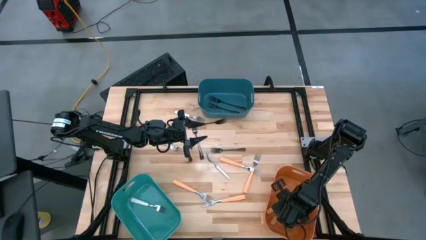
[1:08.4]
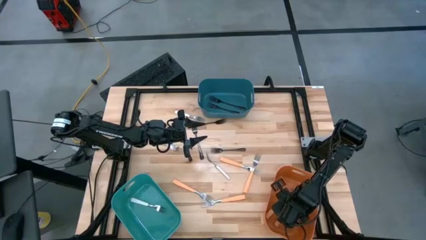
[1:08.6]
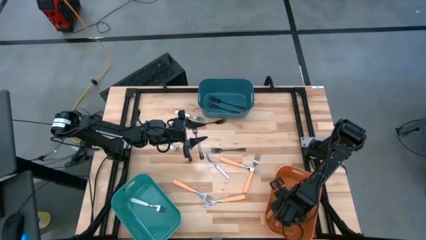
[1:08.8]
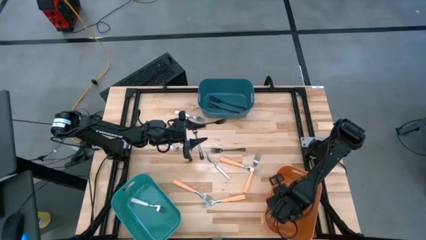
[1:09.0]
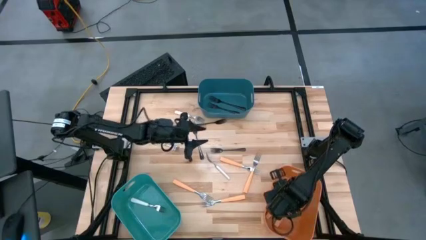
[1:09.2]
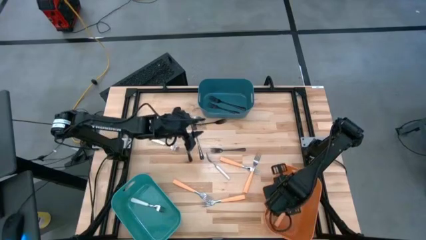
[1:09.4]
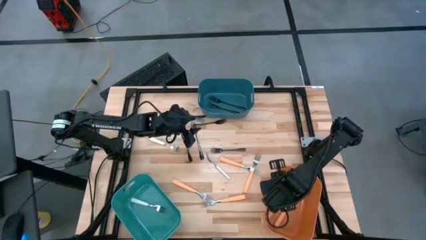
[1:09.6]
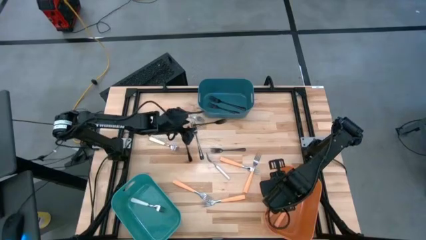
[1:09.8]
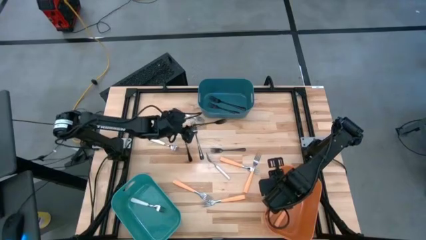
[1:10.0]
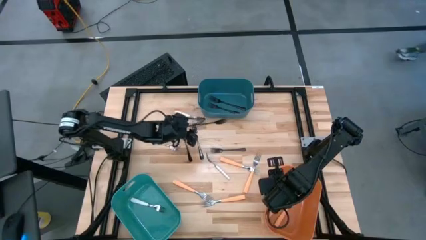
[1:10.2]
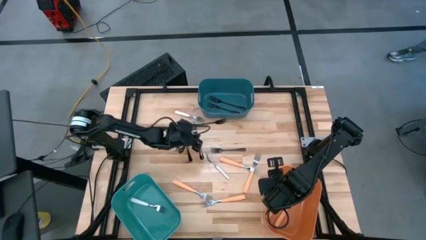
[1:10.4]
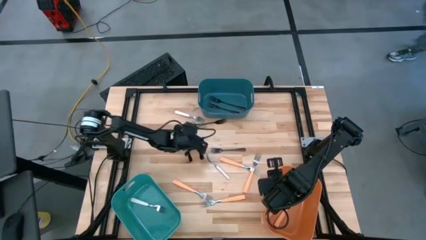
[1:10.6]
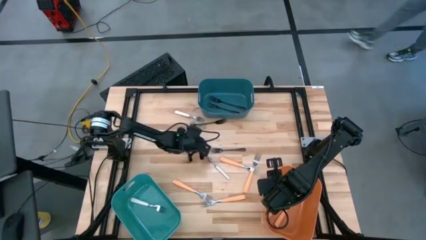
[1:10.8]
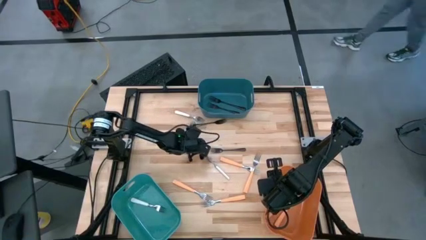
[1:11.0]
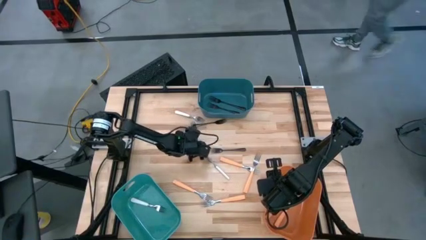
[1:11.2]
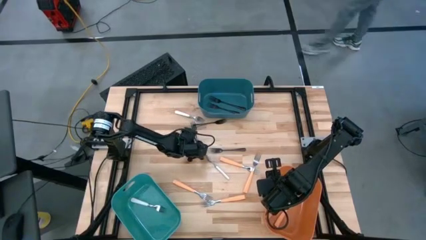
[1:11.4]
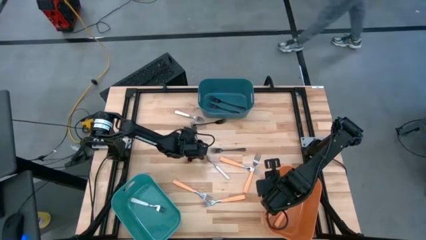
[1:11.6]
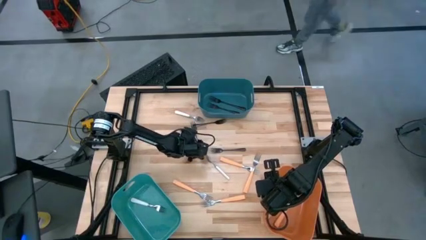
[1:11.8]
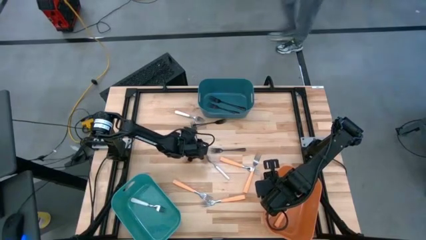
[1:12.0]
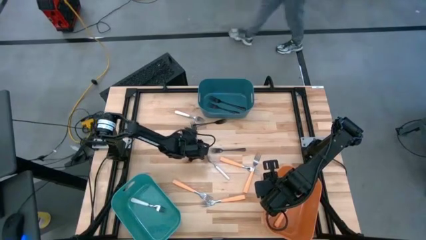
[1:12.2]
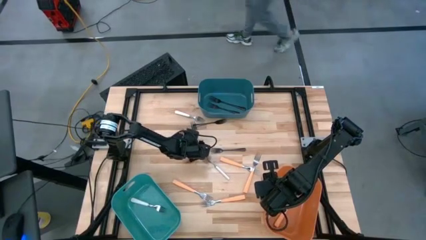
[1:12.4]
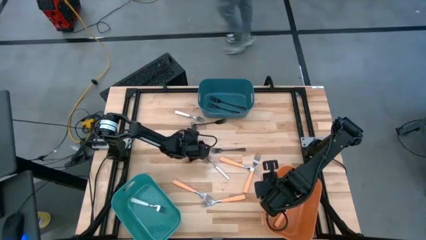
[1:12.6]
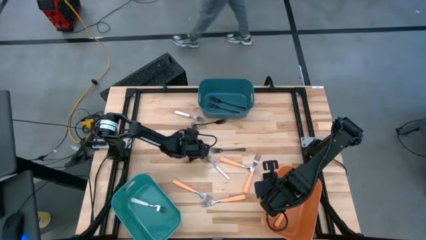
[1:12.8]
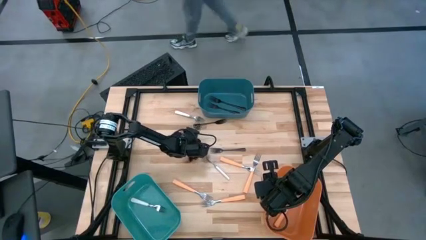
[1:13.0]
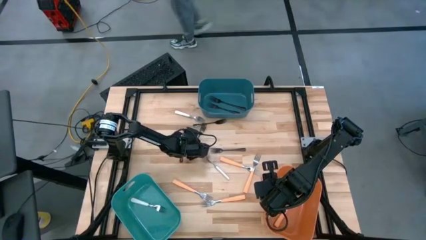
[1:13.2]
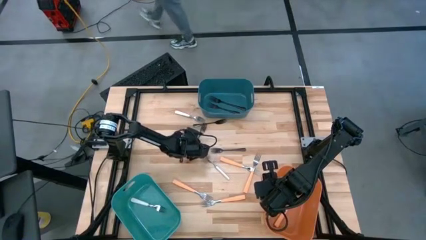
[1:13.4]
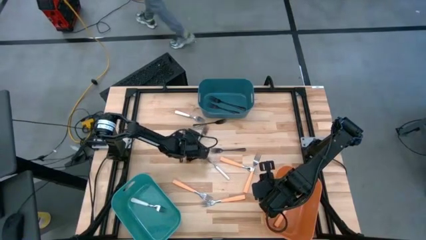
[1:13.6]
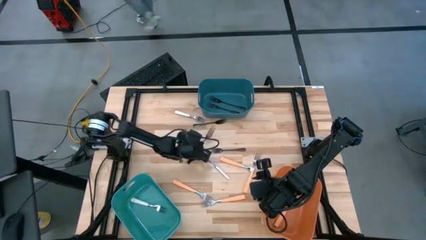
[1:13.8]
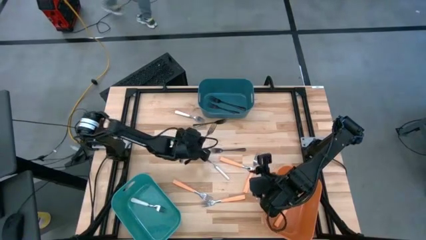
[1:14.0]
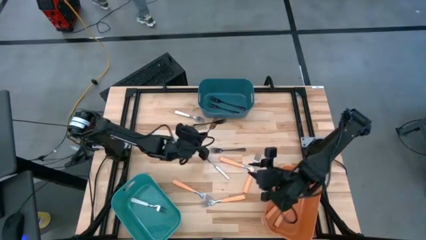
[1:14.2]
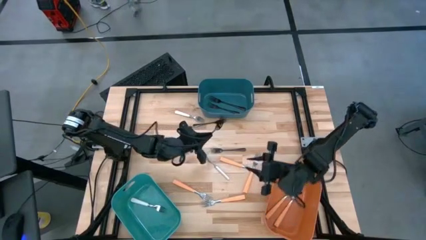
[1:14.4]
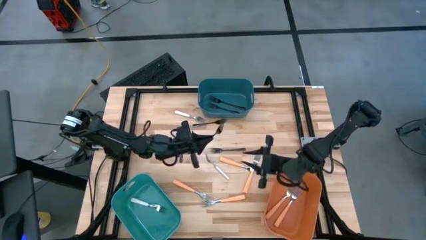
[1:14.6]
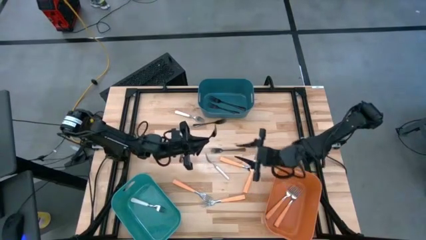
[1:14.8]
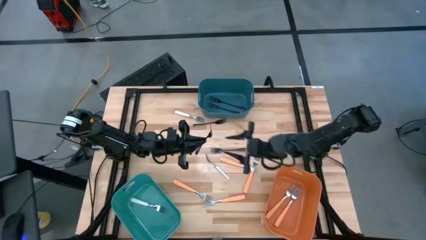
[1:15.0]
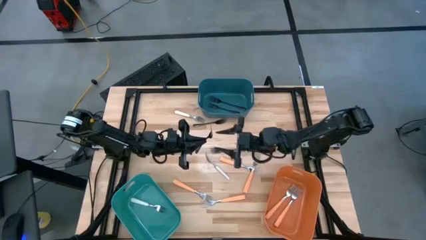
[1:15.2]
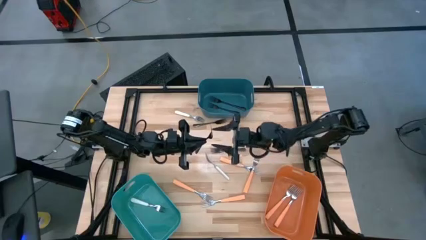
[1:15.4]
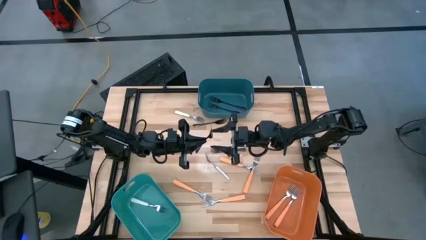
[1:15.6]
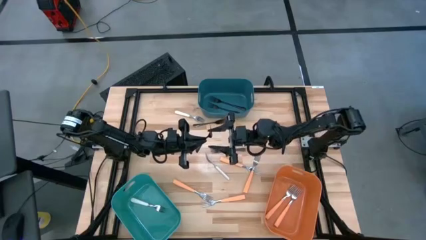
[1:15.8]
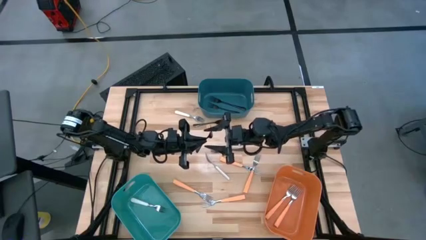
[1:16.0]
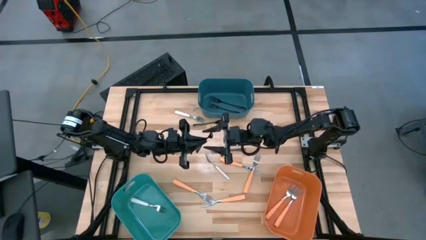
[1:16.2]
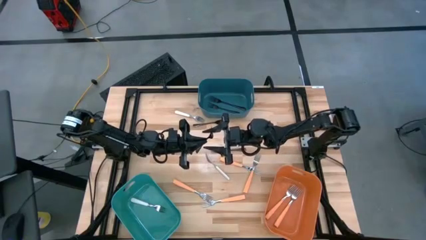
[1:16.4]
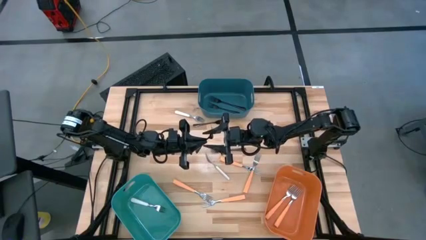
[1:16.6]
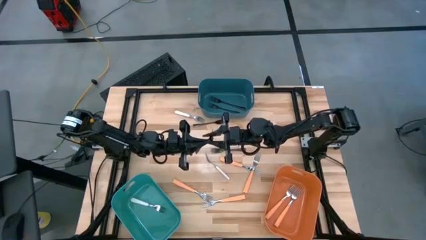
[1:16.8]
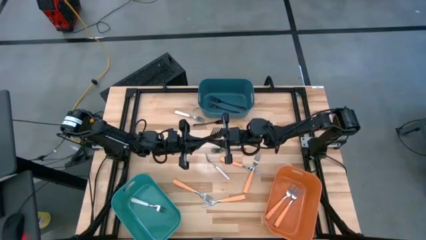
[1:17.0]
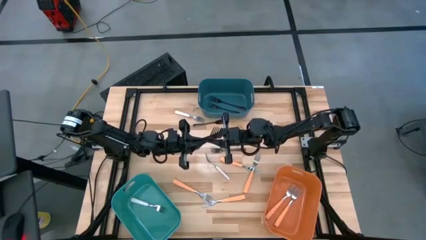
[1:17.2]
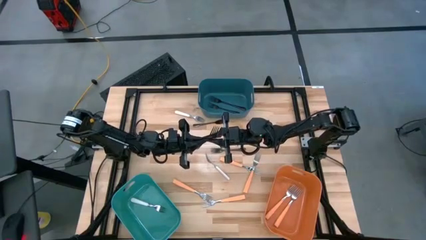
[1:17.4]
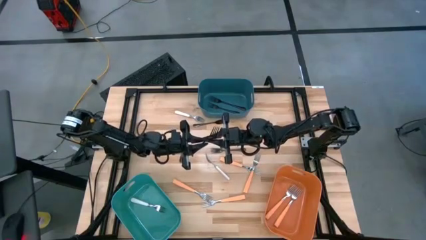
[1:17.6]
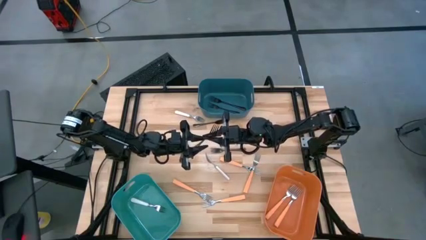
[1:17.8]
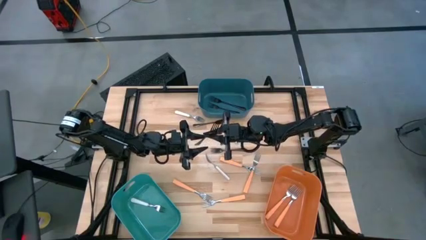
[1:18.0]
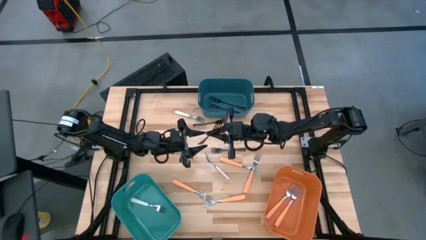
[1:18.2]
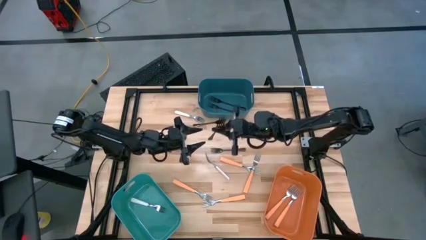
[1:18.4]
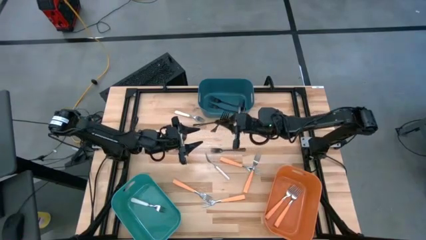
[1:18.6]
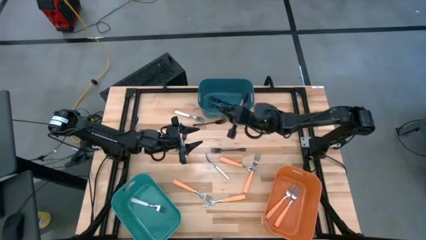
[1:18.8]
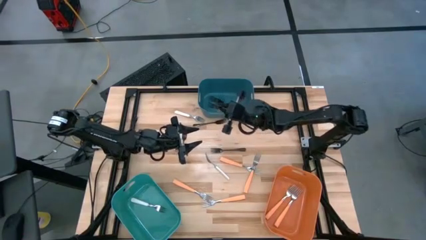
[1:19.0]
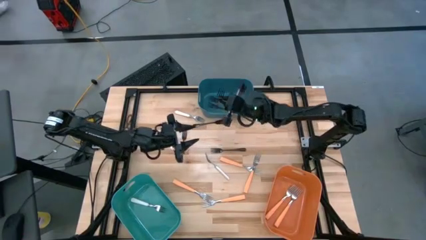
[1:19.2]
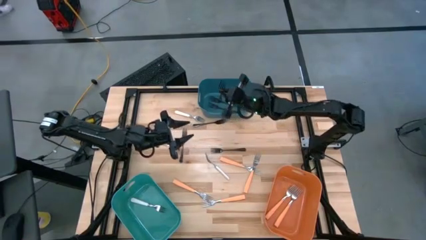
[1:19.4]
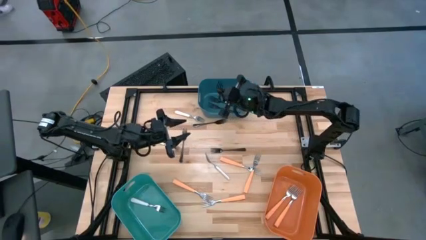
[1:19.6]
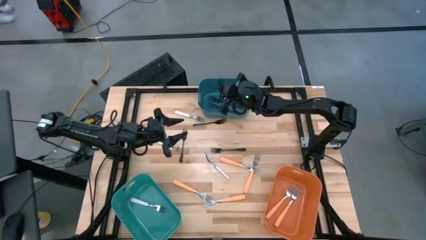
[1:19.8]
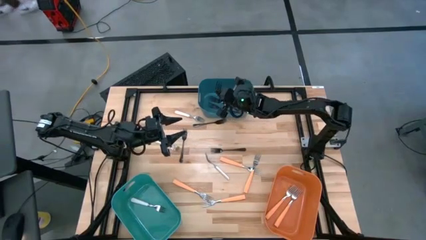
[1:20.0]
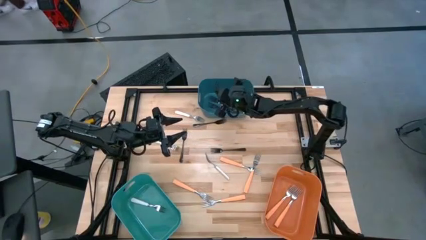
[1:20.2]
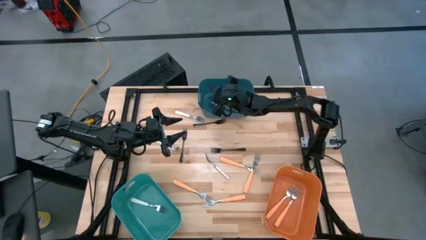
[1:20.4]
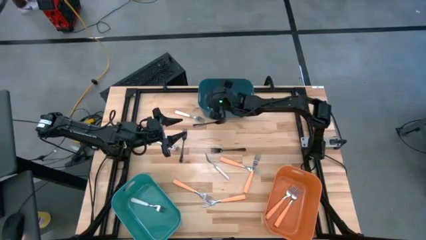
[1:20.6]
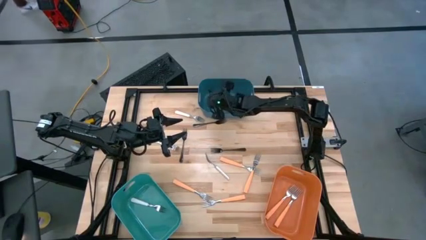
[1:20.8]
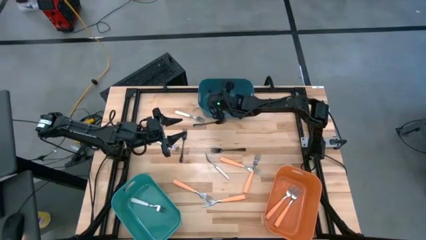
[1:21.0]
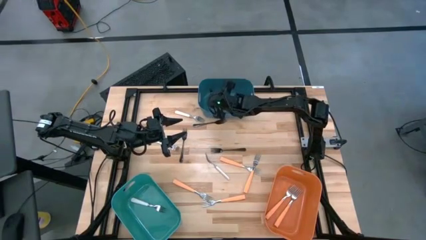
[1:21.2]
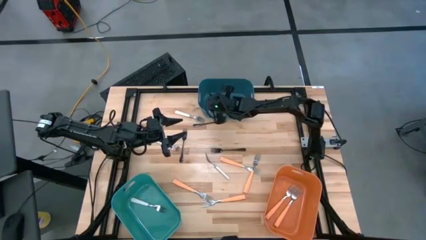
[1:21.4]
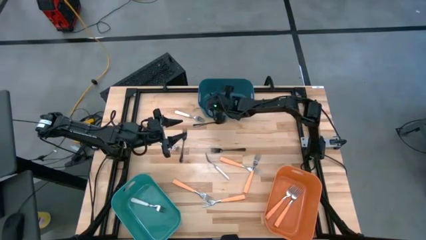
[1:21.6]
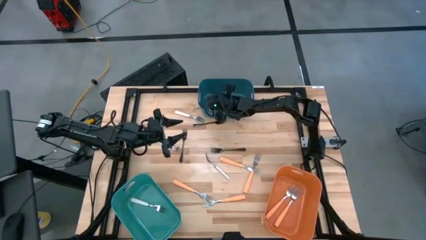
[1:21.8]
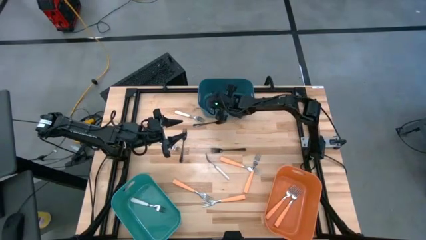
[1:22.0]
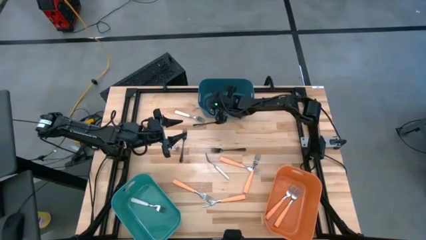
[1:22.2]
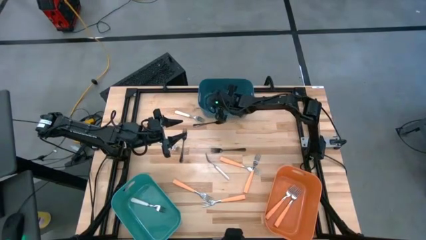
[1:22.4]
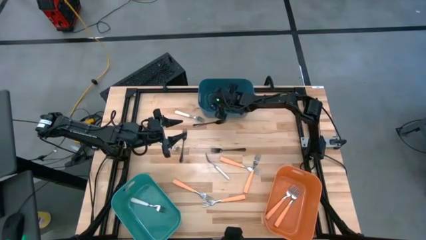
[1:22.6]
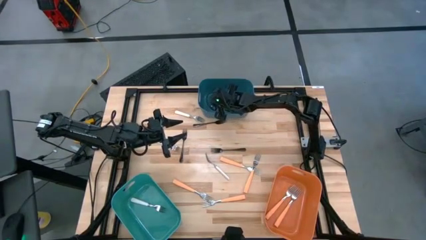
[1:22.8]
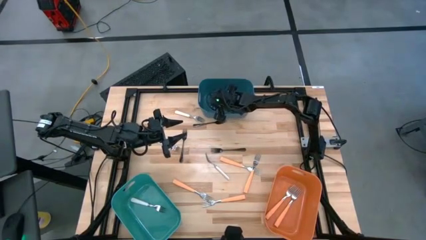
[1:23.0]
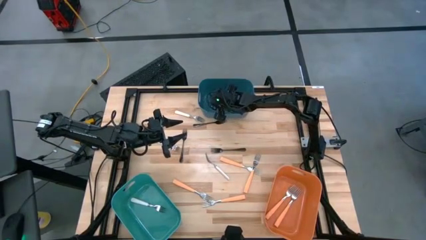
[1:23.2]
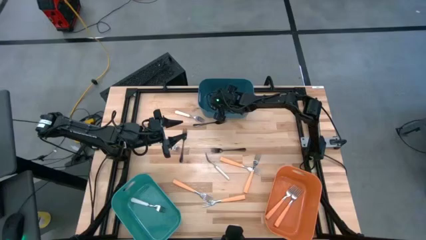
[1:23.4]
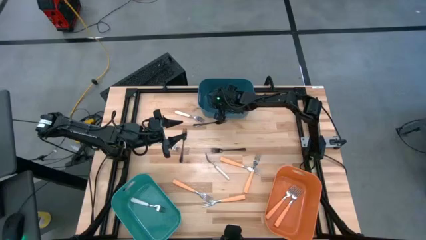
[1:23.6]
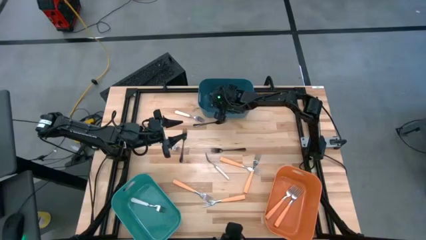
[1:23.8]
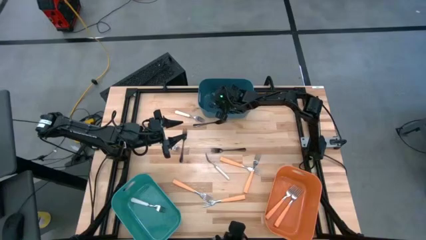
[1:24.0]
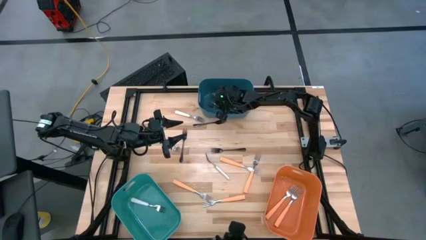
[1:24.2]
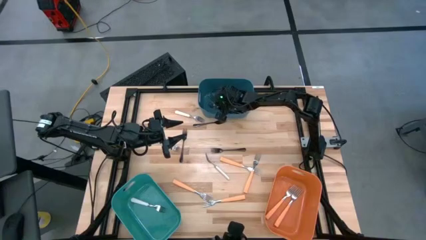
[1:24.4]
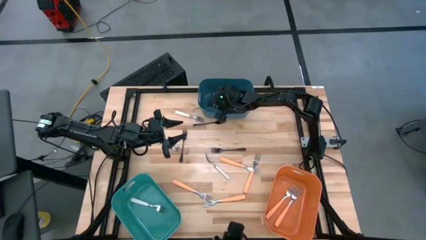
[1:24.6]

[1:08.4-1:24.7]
Task: Sort silverware by color (type)
Put the black fork into the blue bin
